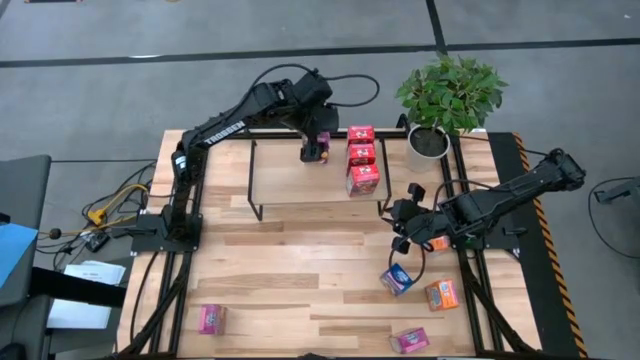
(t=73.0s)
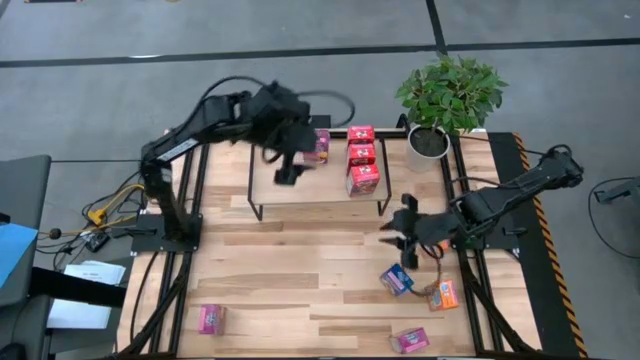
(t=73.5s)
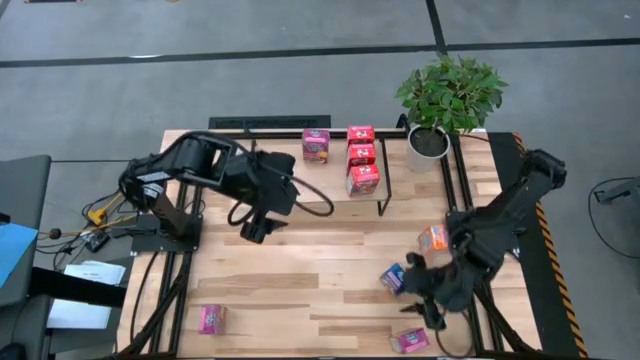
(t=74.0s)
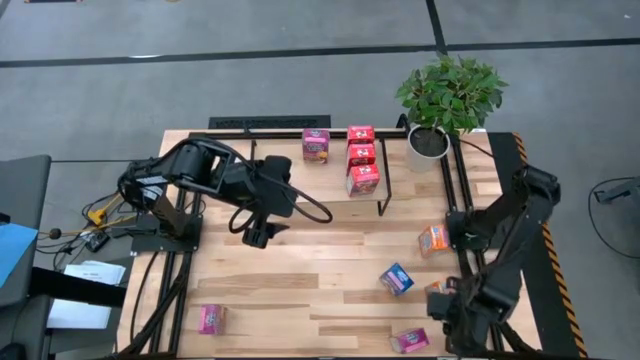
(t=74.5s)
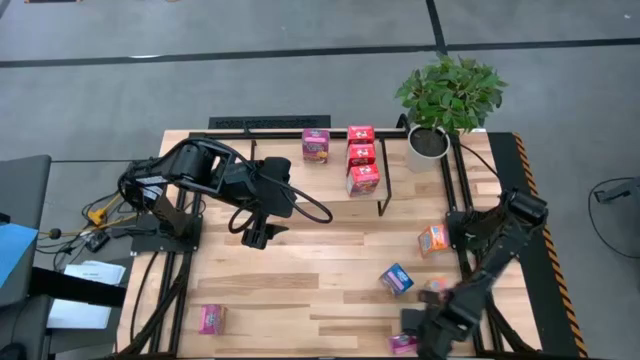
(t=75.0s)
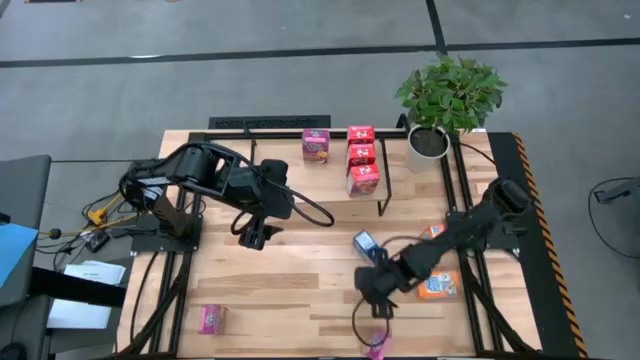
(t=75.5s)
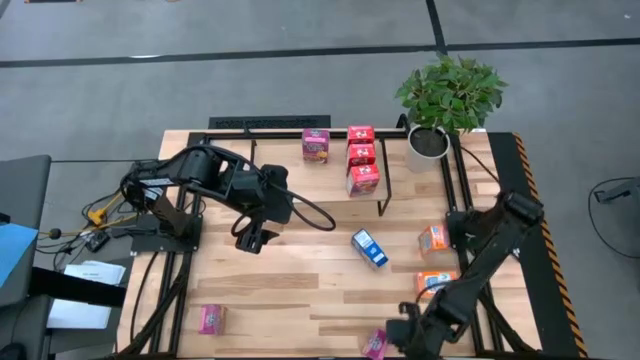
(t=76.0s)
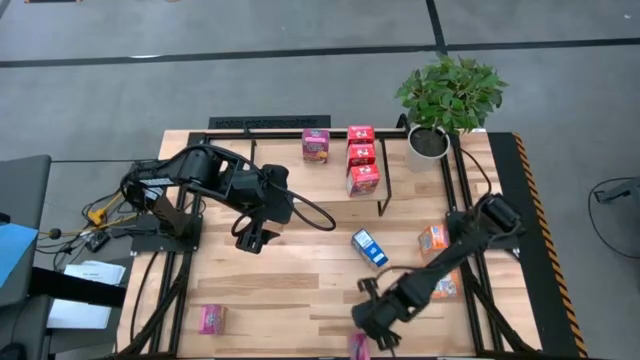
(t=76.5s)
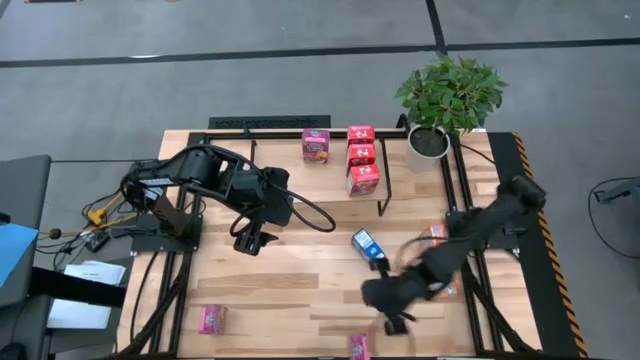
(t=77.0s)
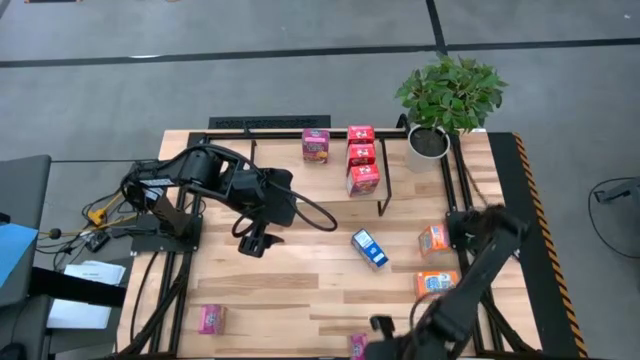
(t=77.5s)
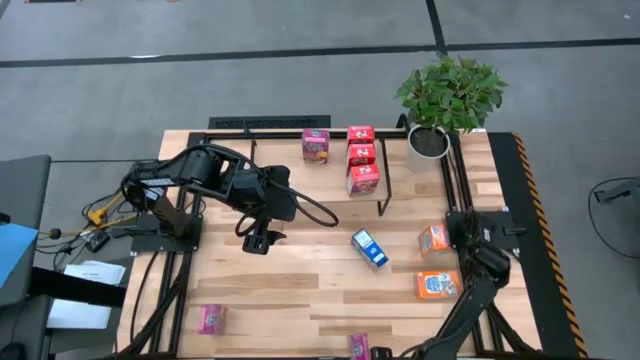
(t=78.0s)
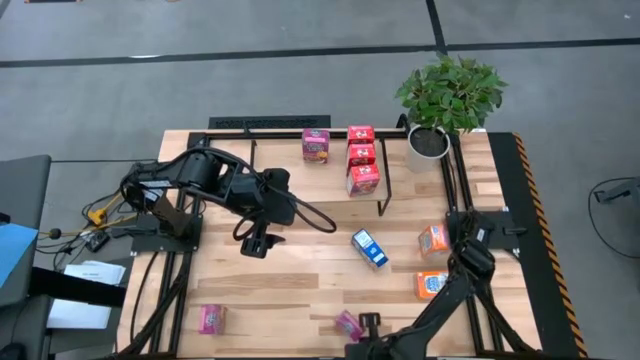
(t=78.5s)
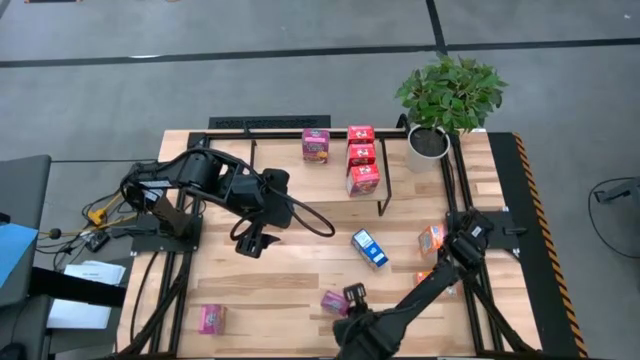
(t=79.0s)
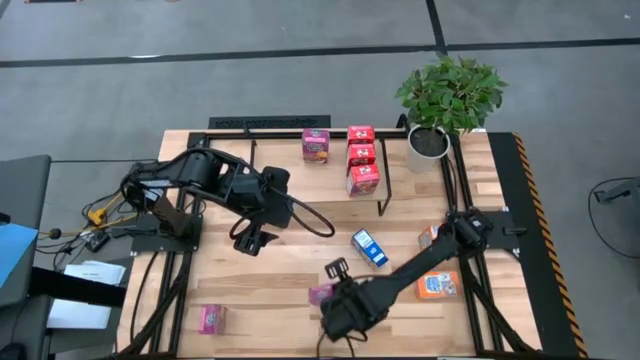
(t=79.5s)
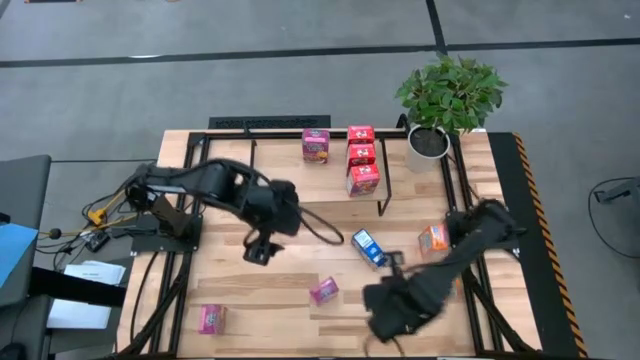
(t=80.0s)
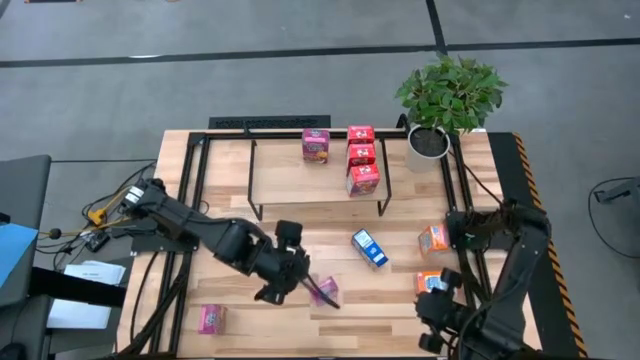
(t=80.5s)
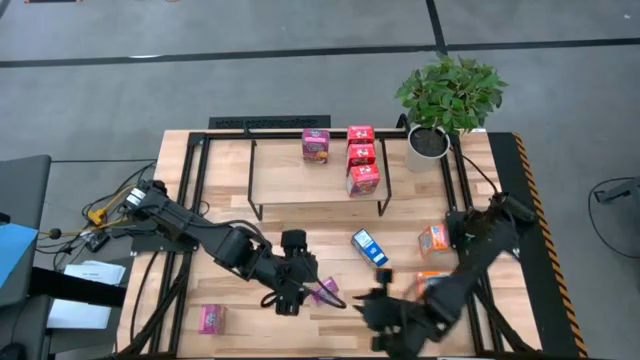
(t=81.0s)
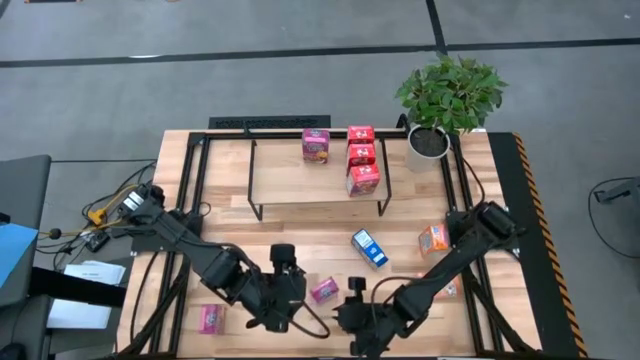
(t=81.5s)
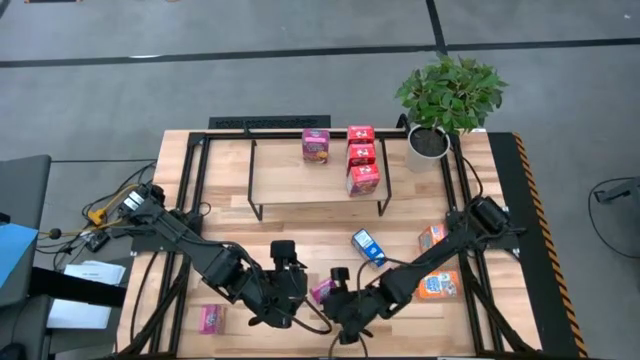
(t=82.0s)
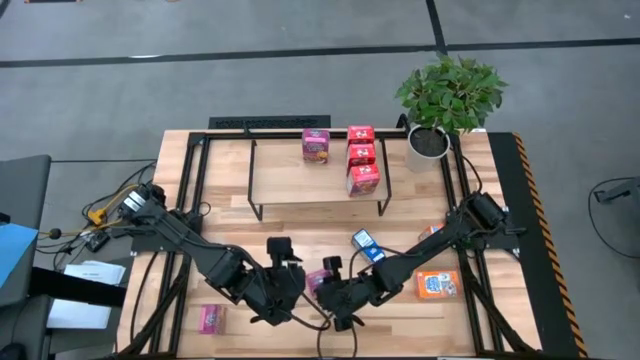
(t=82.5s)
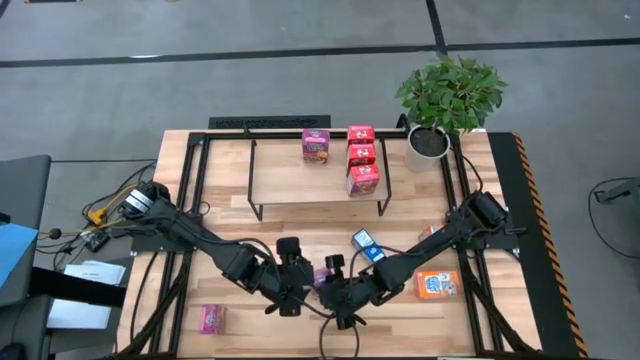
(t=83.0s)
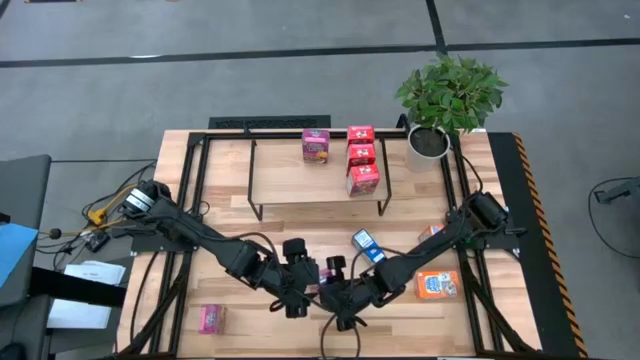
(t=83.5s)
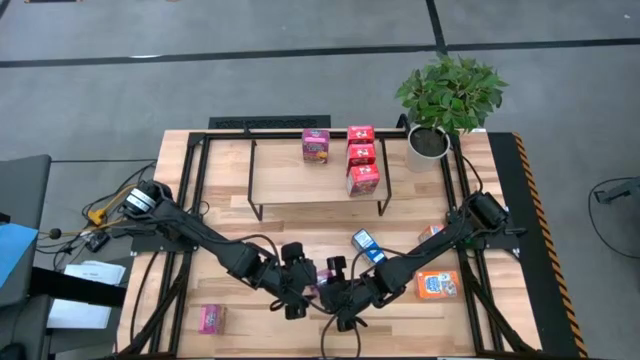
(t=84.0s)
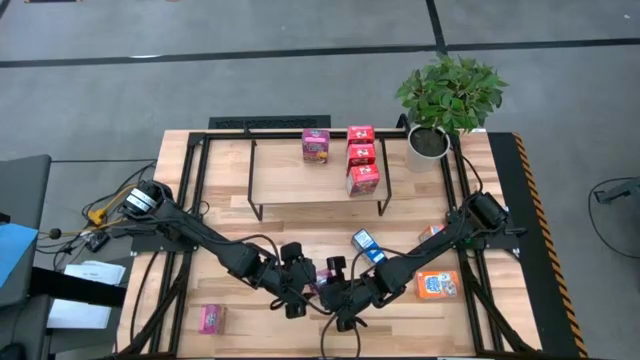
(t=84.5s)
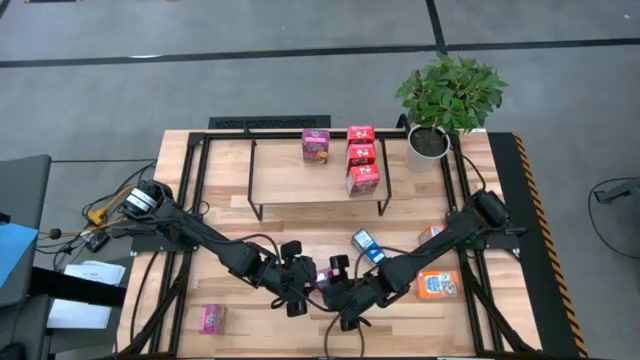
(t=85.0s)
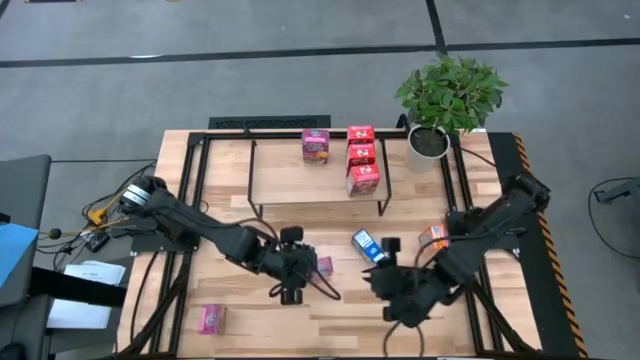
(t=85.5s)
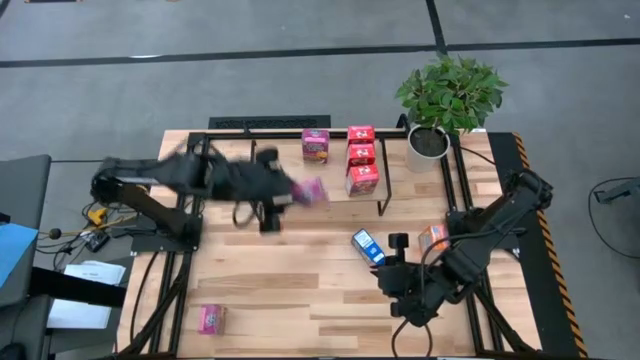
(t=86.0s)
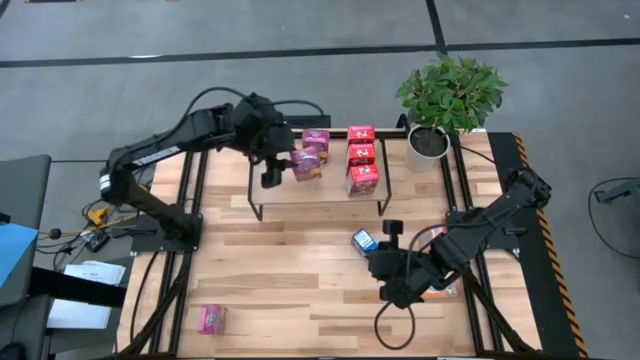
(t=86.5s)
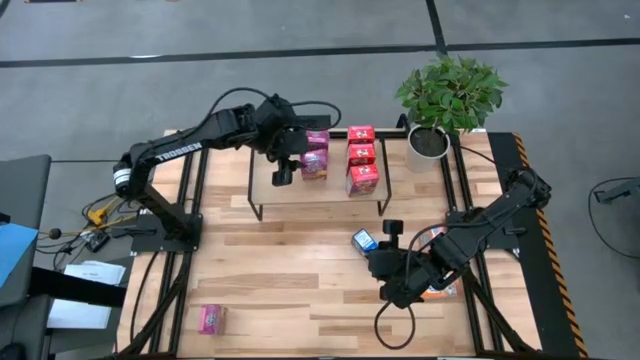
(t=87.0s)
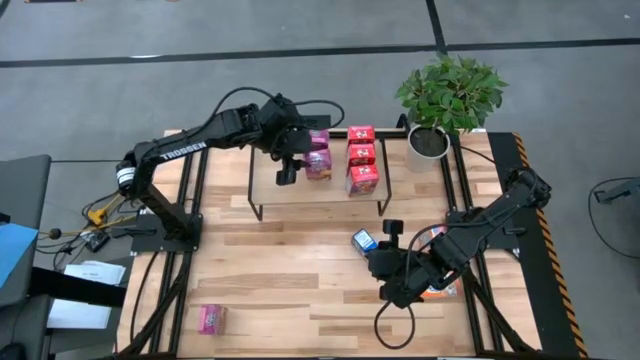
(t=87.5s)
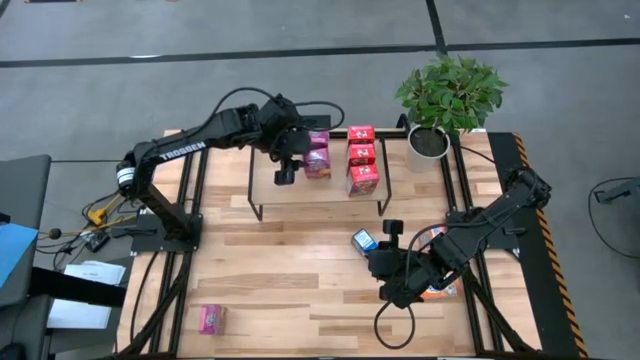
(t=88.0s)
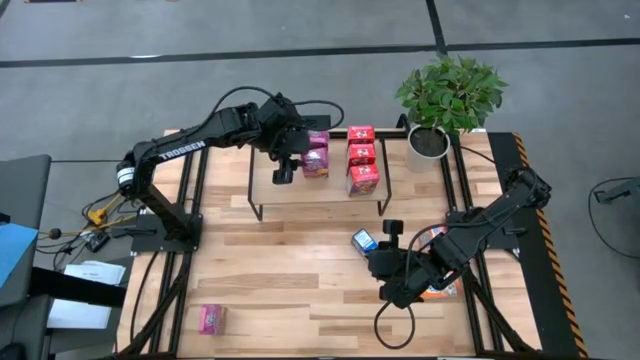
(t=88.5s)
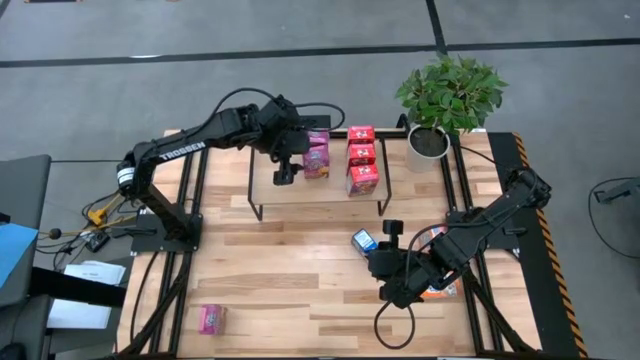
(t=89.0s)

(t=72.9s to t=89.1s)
Task: Stack cereal on shelf
Put the bottom purple cereal box on the shelf aligned with the other purple cereal box

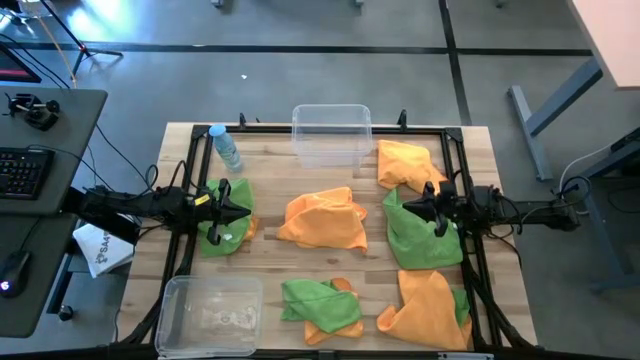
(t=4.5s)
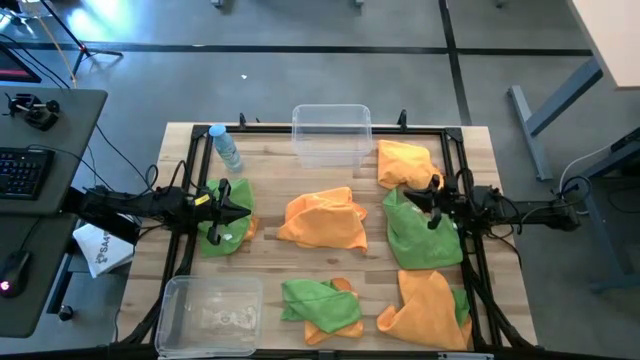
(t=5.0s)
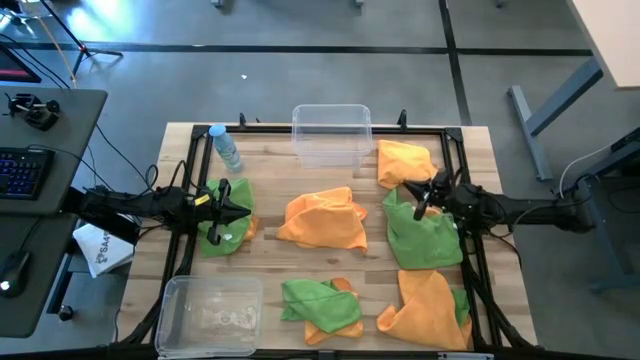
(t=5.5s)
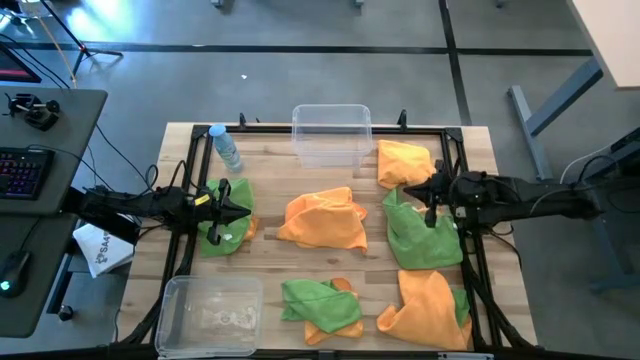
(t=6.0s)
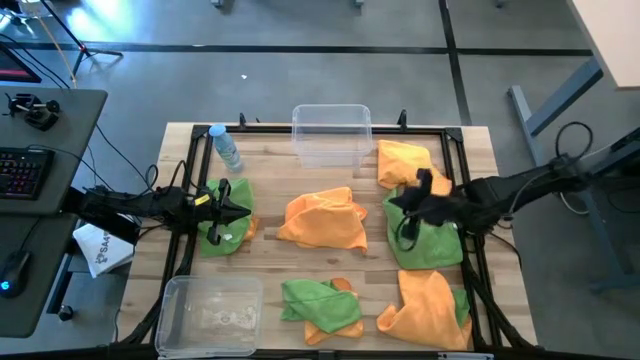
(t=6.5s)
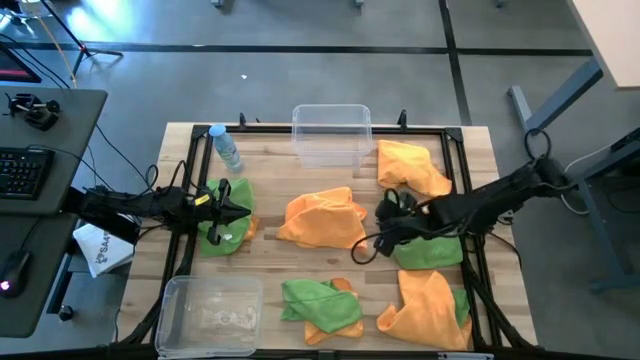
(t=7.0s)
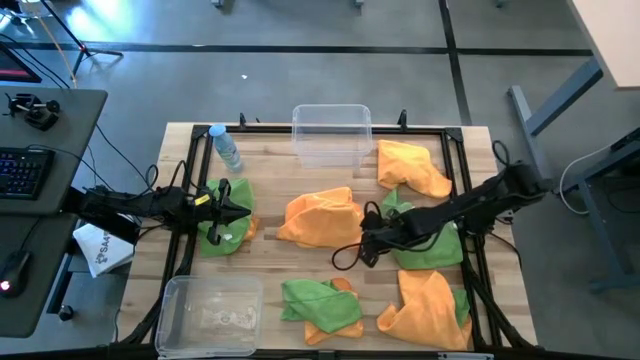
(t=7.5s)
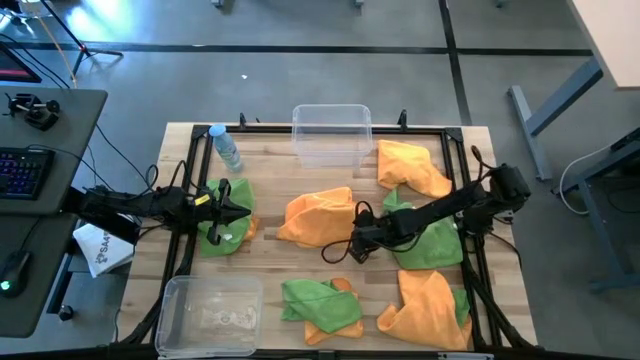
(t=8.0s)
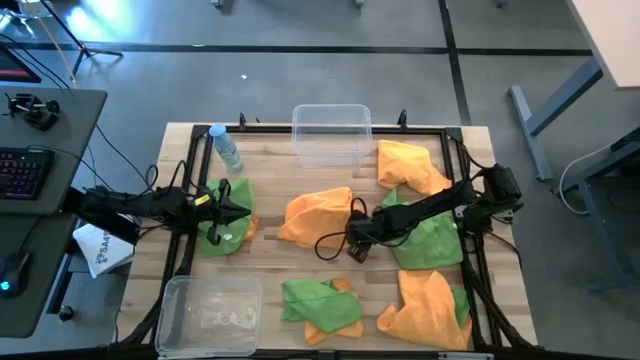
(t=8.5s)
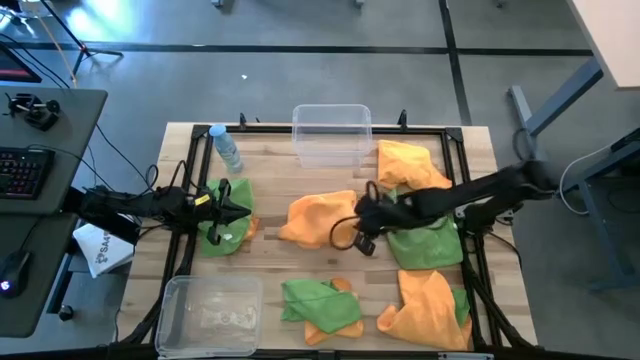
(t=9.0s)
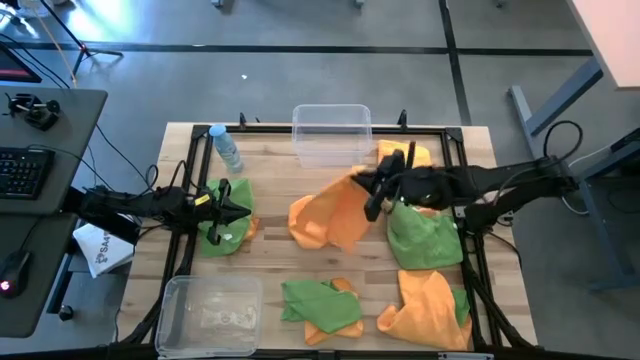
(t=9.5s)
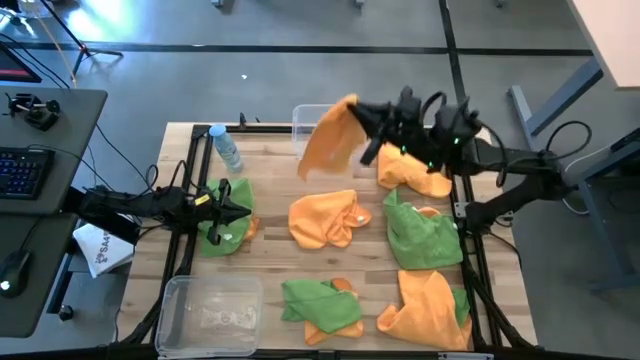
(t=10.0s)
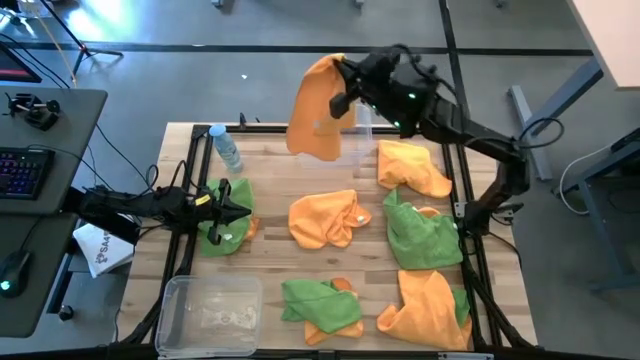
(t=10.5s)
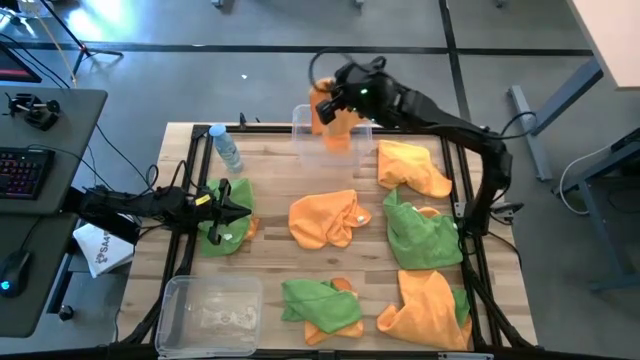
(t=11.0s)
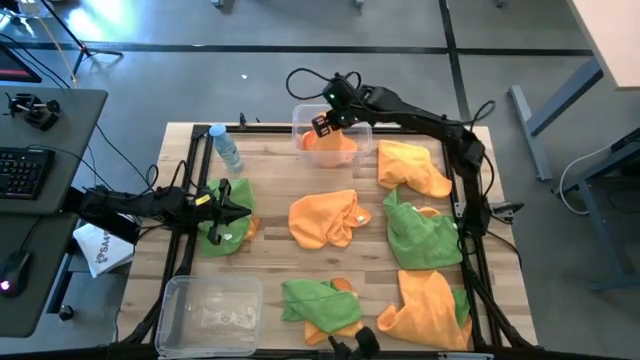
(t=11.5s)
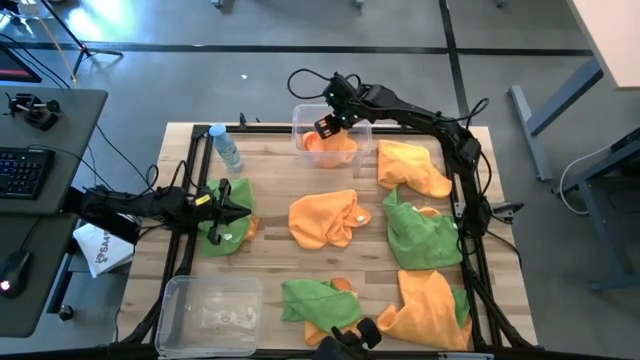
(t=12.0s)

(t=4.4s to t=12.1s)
Task: Sort microfiber towel by color & place in baskets
Put the orange towel into the top transparent bin
